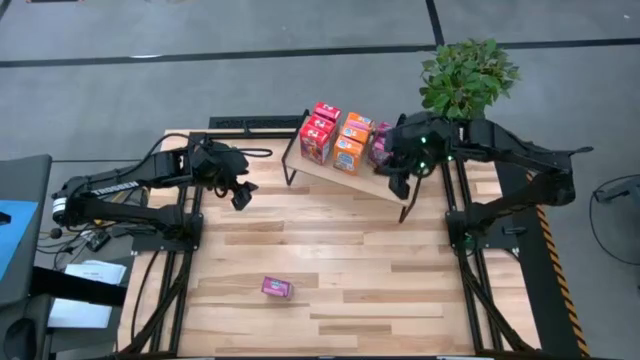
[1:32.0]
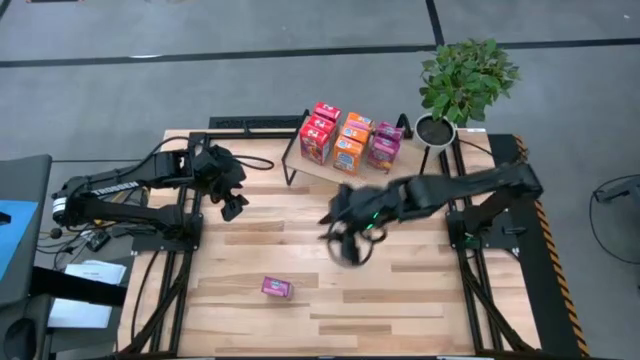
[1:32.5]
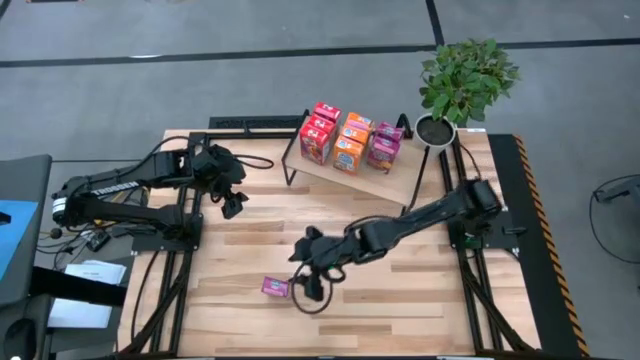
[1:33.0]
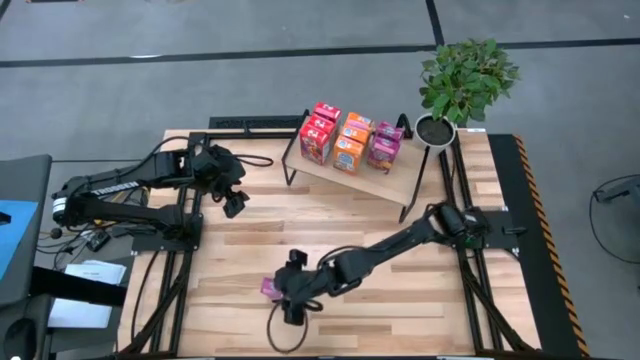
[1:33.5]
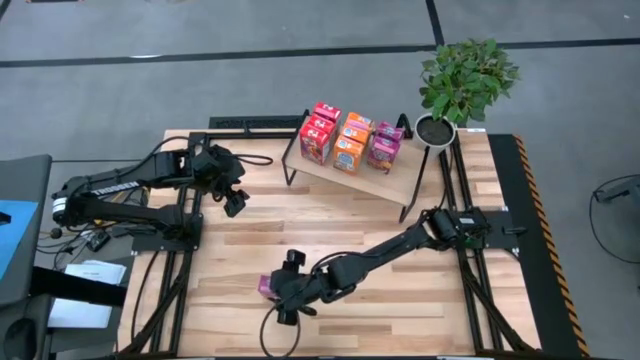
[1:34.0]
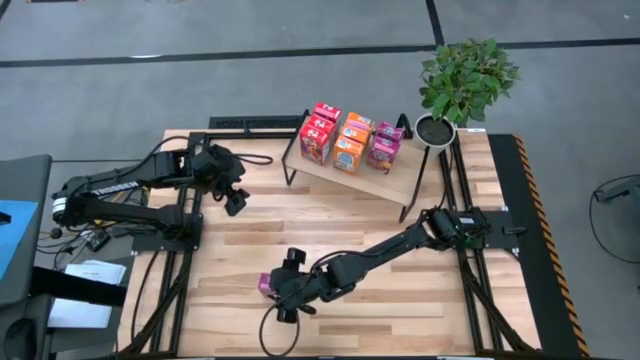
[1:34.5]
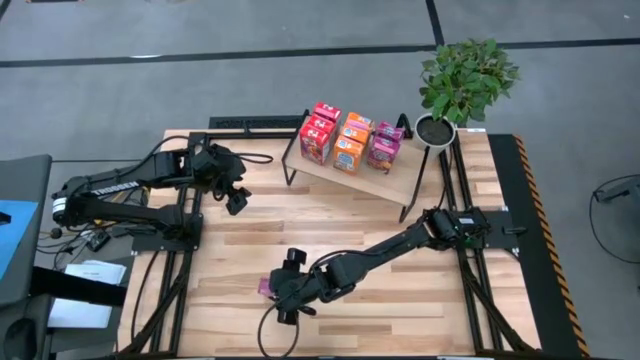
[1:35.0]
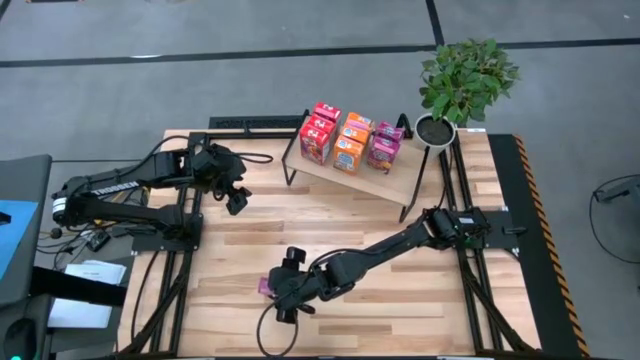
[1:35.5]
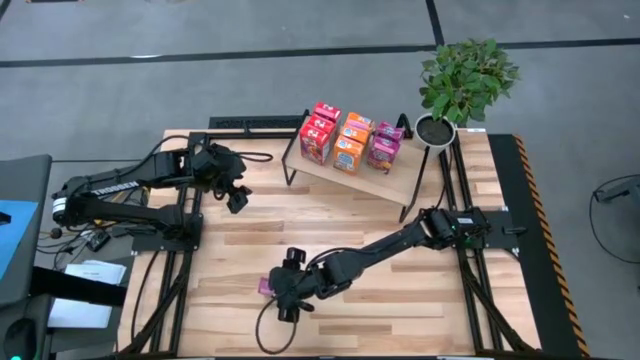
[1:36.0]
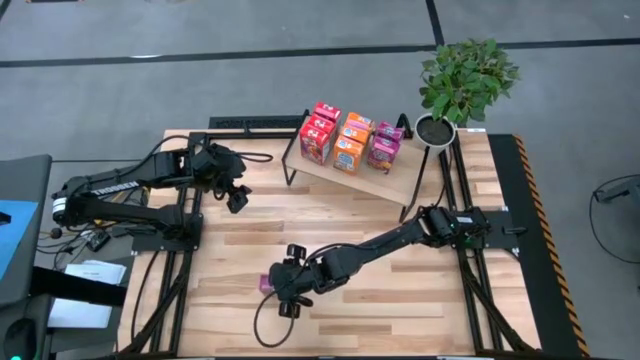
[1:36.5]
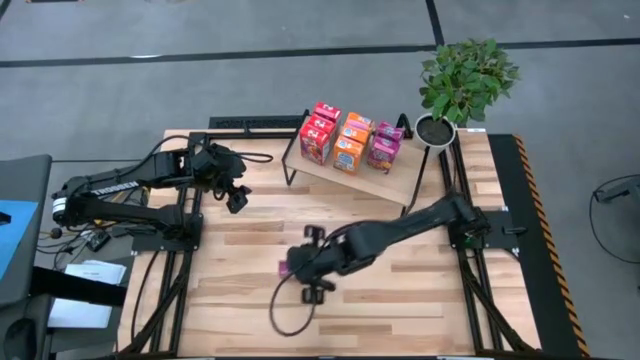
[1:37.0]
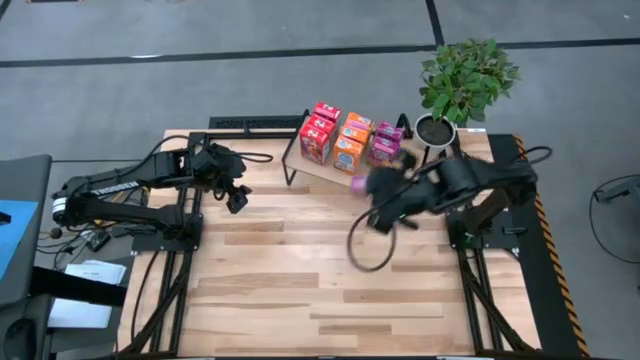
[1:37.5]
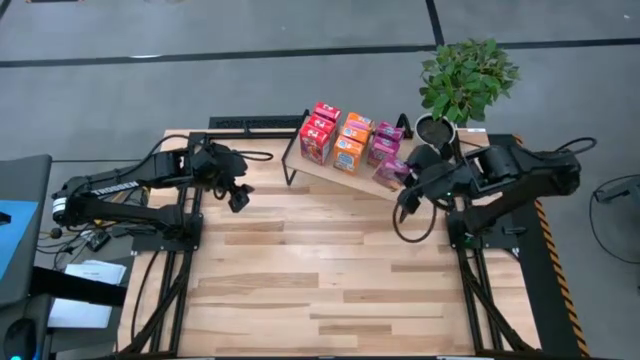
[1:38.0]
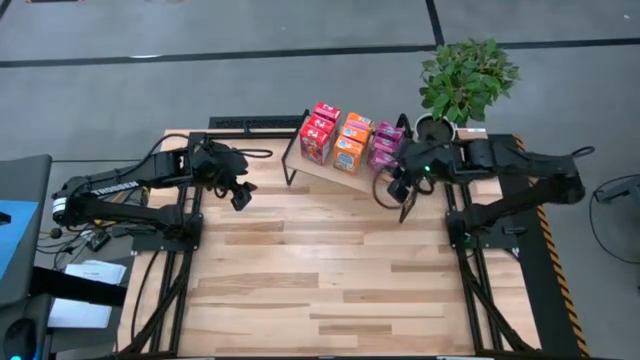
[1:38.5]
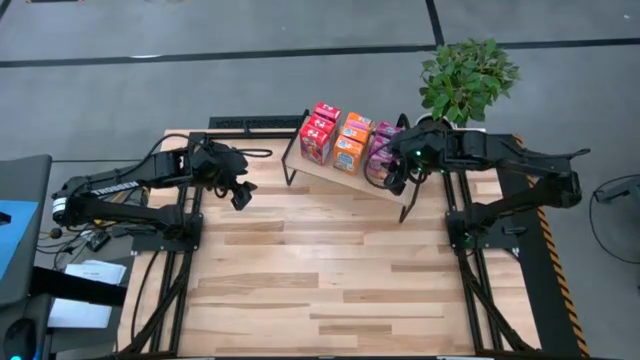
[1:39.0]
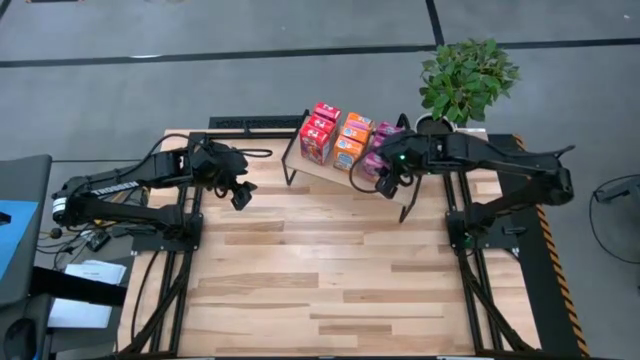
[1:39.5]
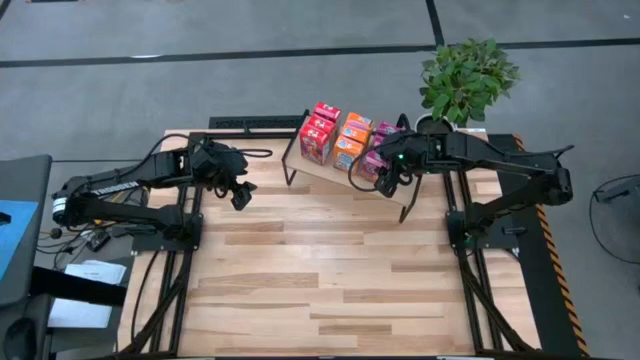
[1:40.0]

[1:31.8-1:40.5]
Task: Stack cereal on shelf
Put the purple cereal box on the shelf aligned with the other purple cereal boxes

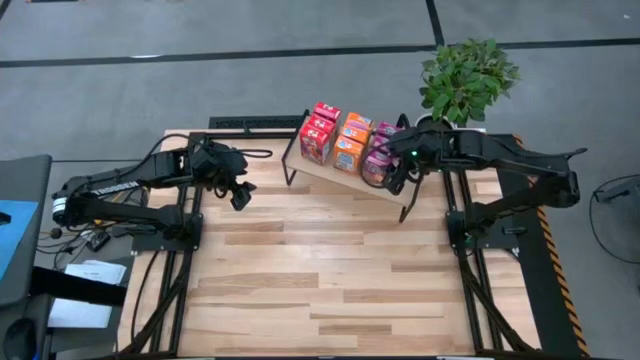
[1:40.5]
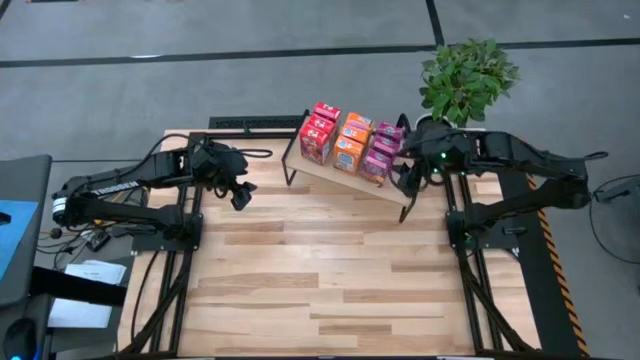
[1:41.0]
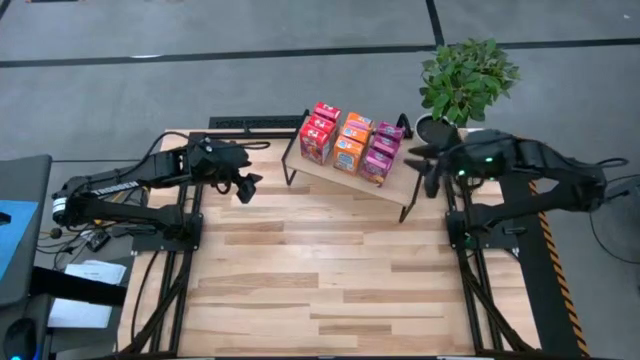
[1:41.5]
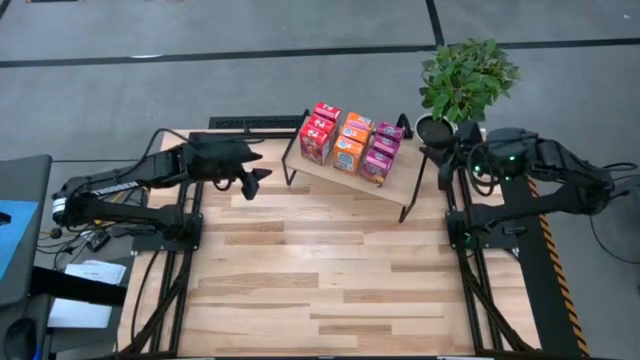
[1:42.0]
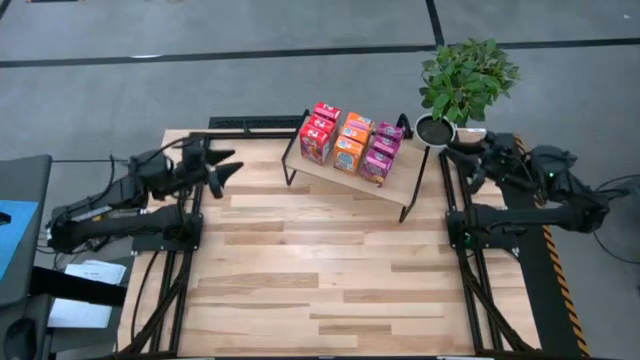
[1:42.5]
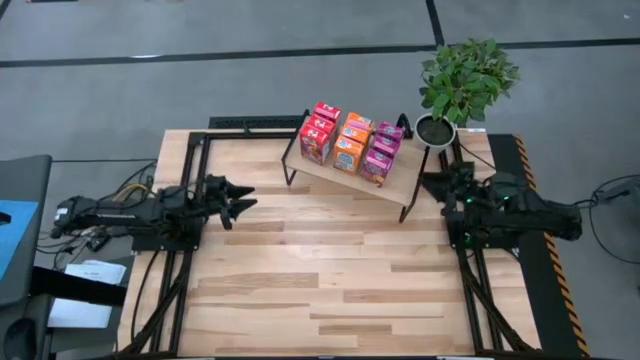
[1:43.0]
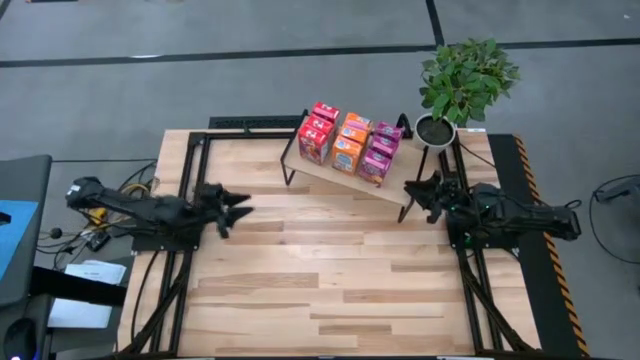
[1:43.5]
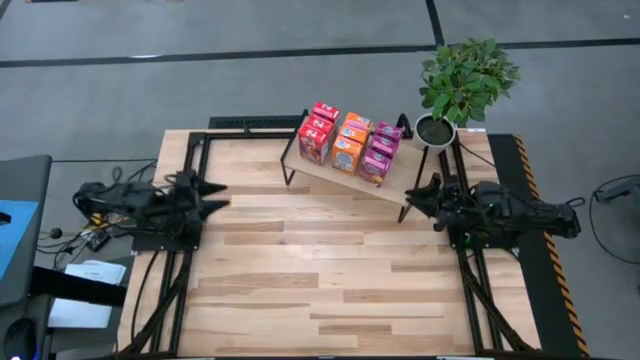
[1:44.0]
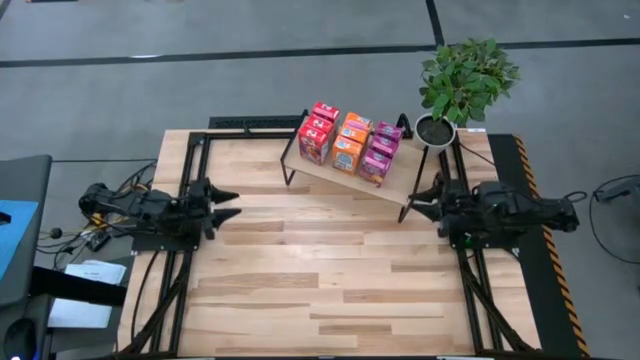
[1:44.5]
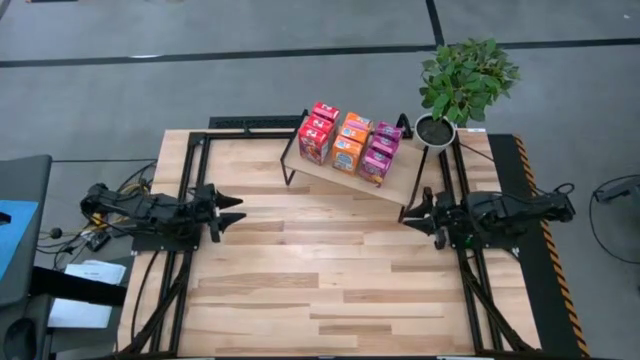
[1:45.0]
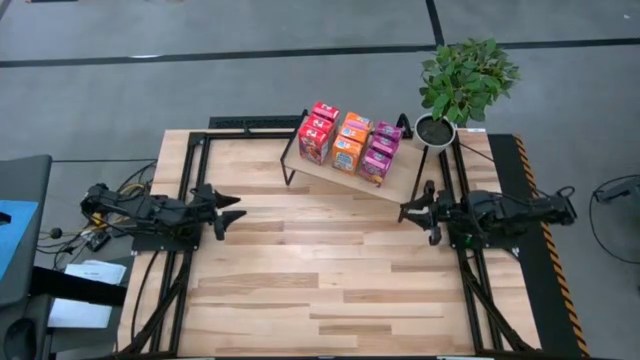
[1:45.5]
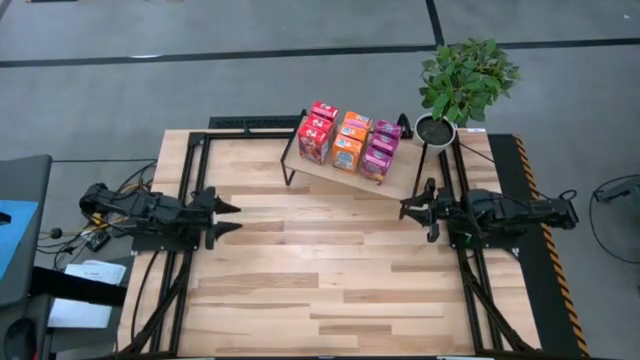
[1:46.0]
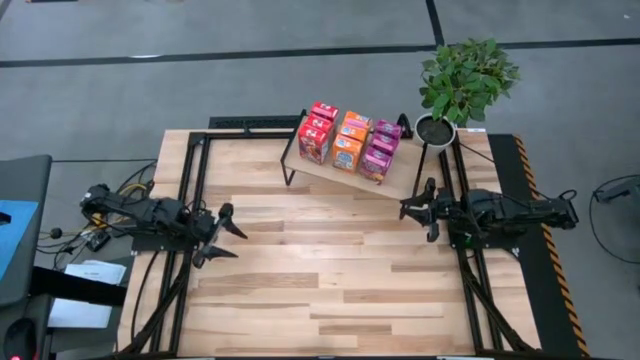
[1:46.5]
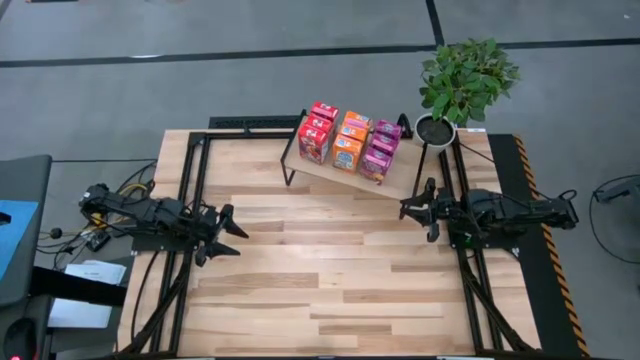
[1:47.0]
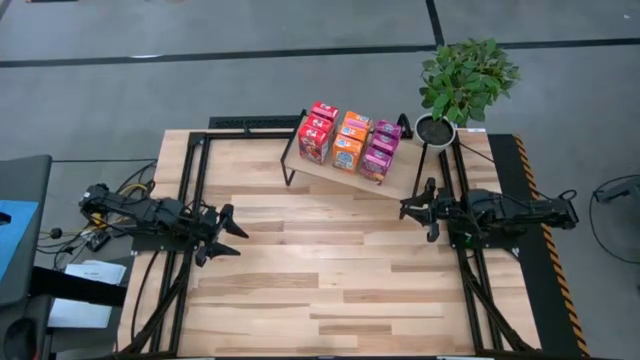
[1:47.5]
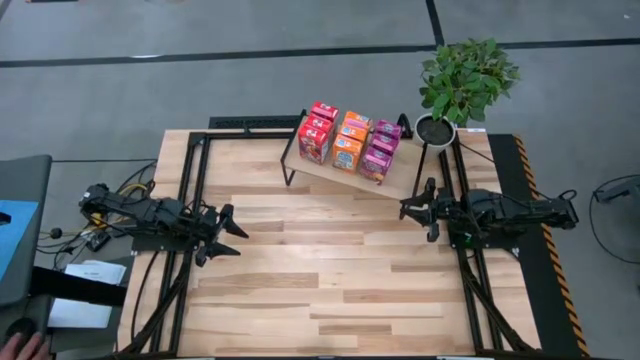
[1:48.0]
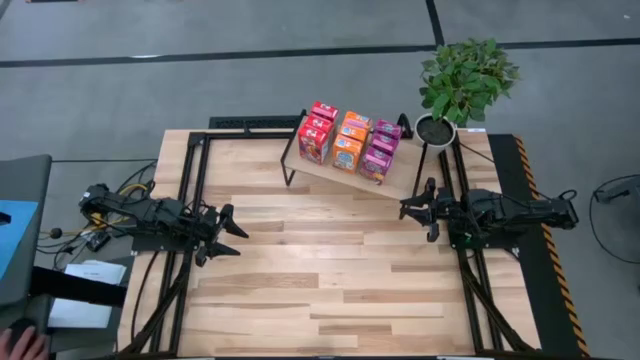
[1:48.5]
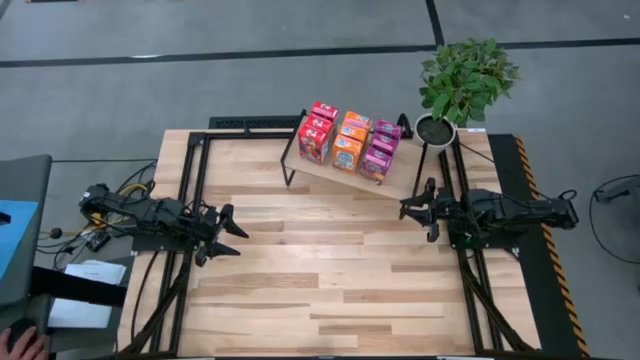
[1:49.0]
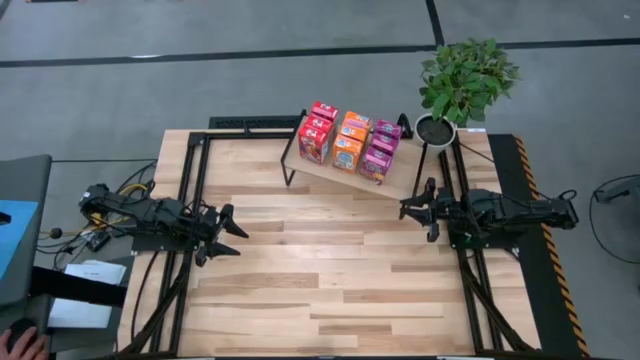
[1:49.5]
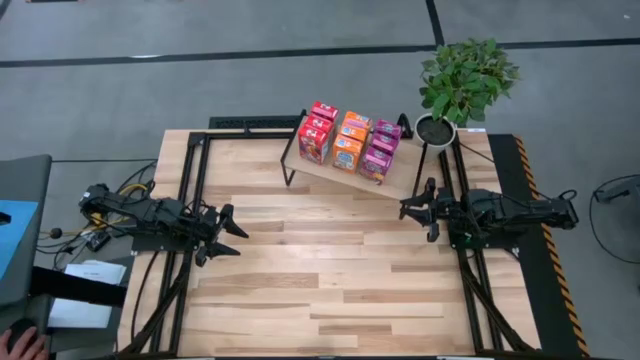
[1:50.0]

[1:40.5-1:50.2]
Return to Home Position

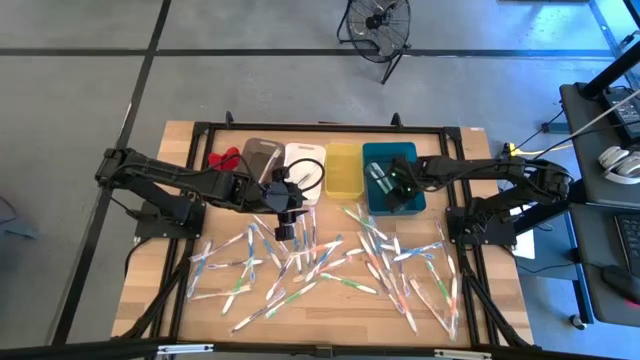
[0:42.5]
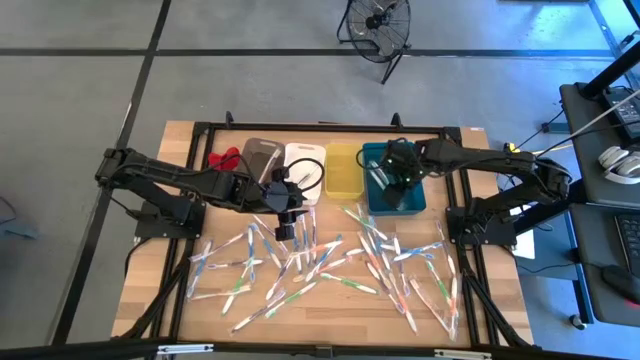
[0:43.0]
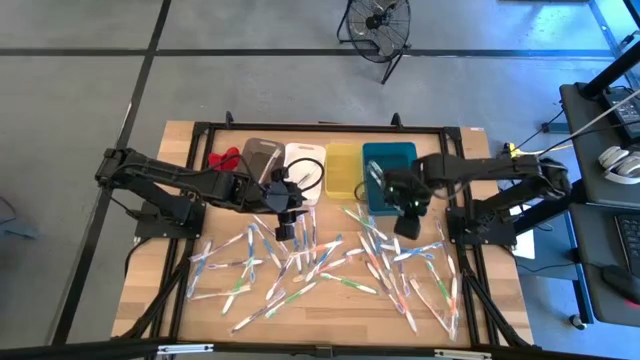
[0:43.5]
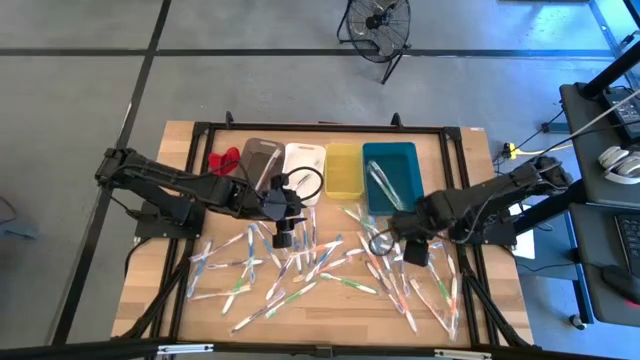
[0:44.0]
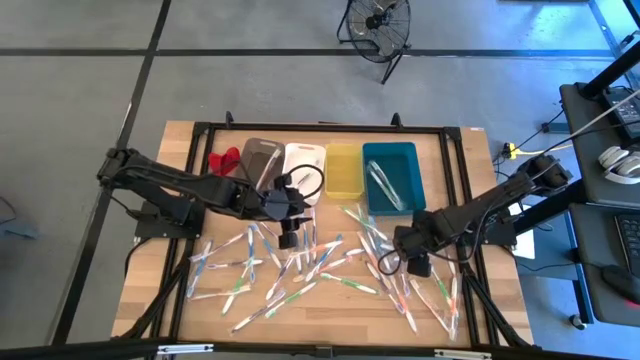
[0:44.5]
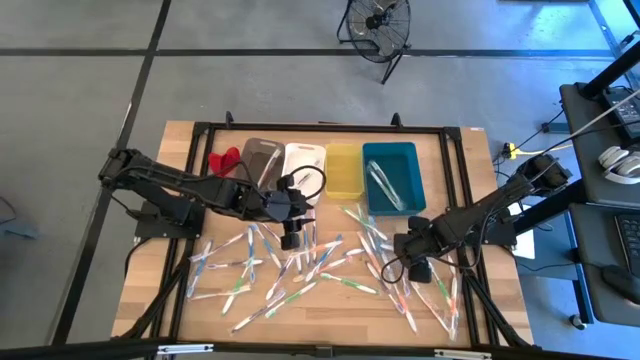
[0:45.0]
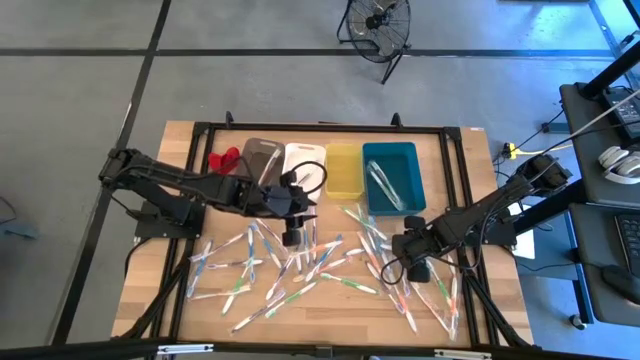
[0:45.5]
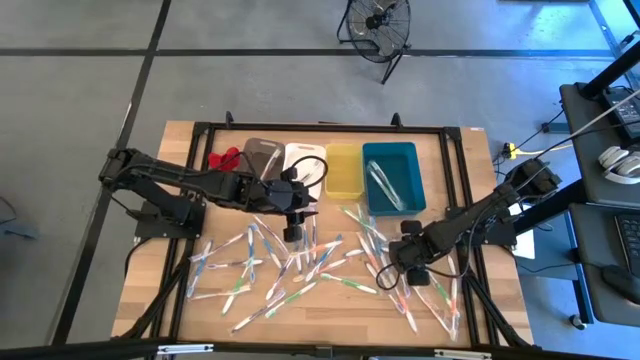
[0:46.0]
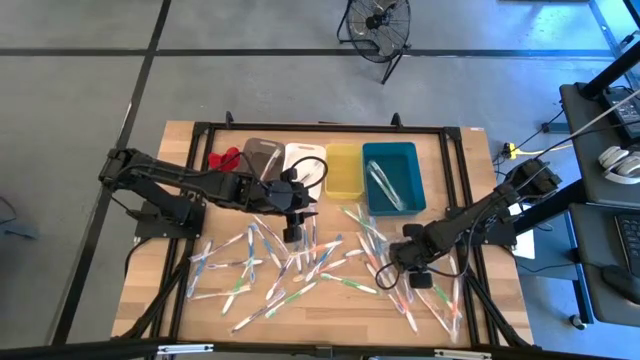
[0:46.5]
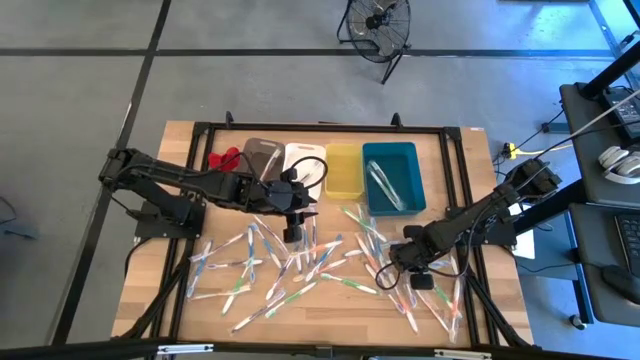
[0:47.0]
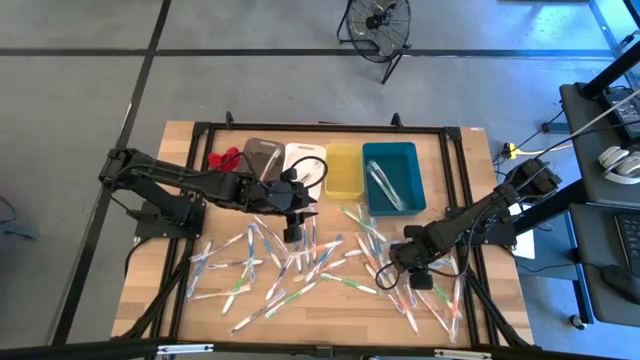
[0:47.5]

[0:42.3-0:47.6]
Task: Pick & Place Toothbrushes
Put the blue toothbrush into the yellow bin
